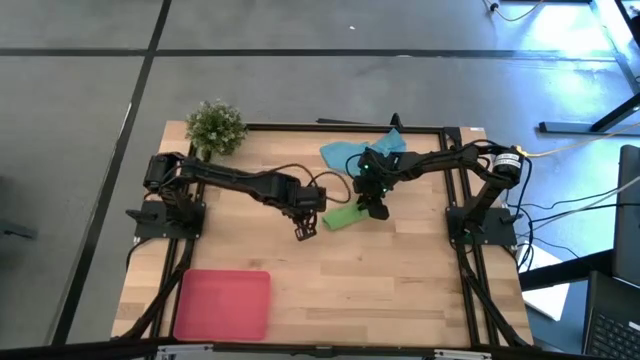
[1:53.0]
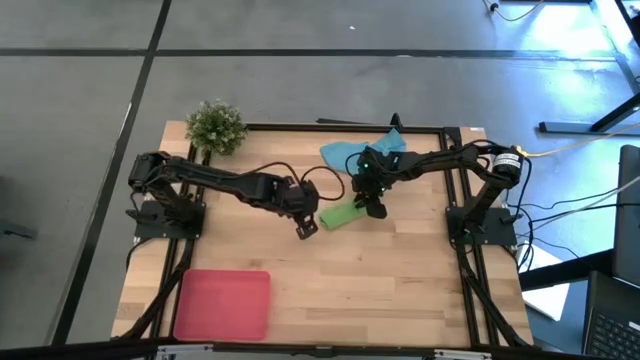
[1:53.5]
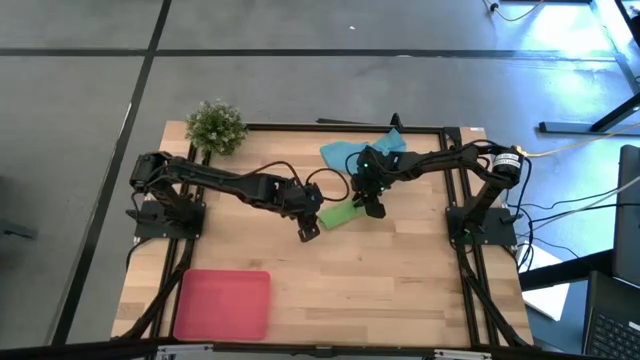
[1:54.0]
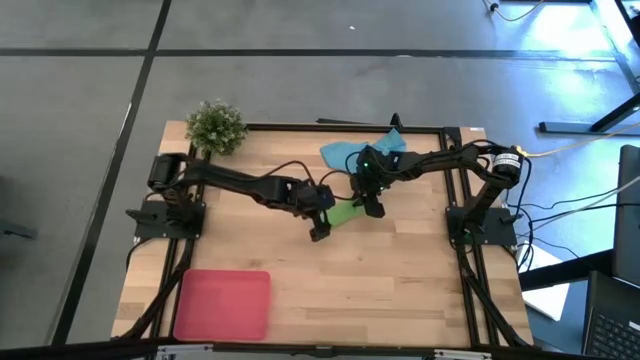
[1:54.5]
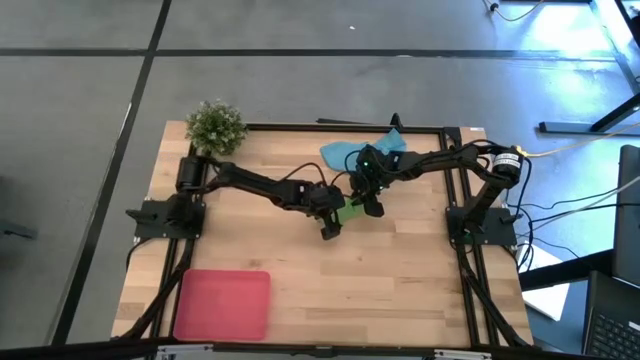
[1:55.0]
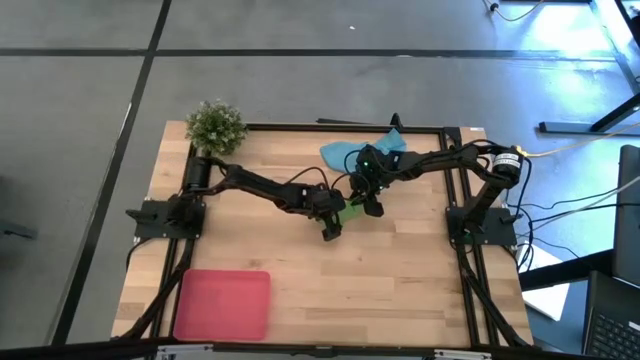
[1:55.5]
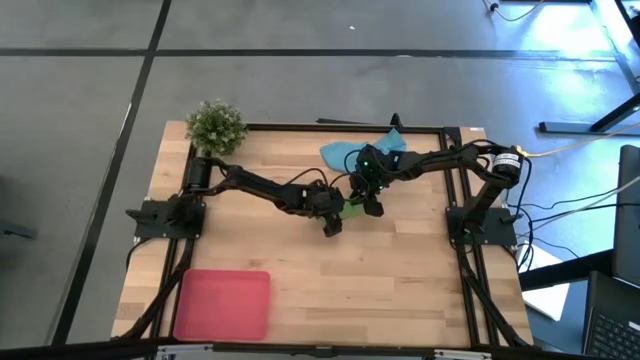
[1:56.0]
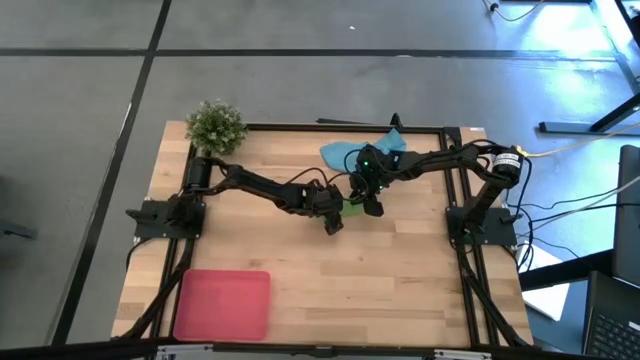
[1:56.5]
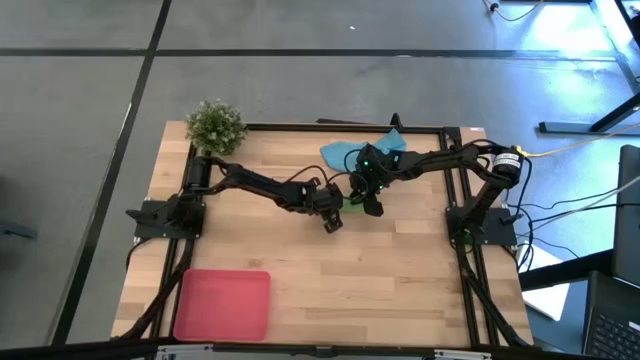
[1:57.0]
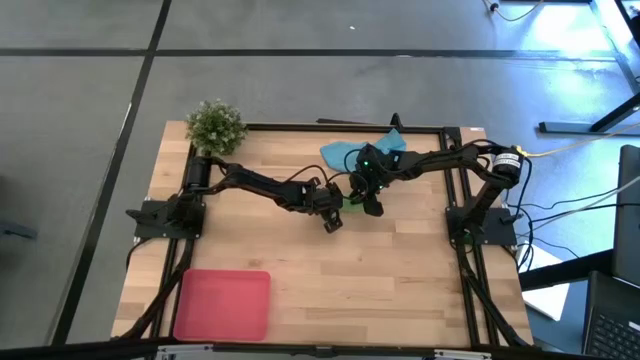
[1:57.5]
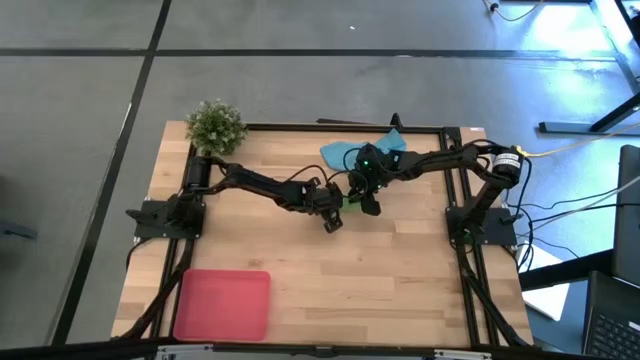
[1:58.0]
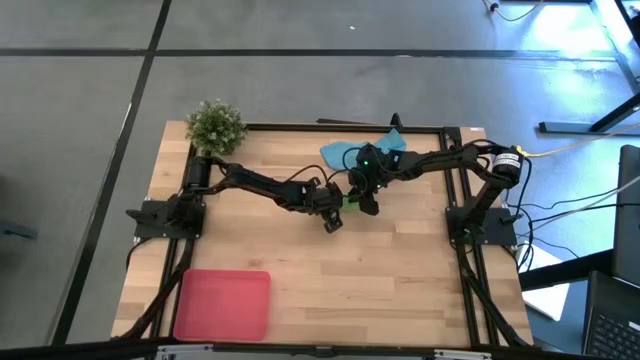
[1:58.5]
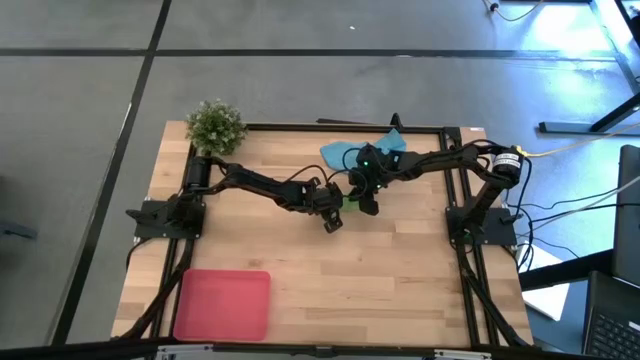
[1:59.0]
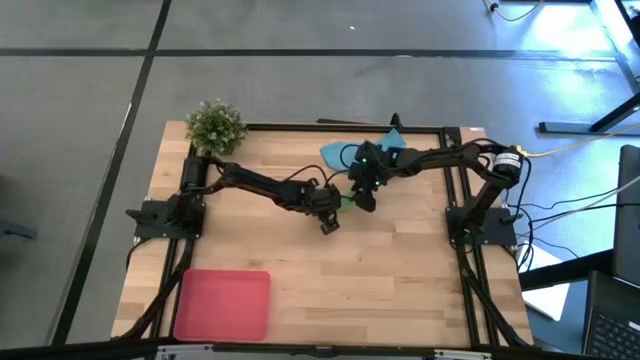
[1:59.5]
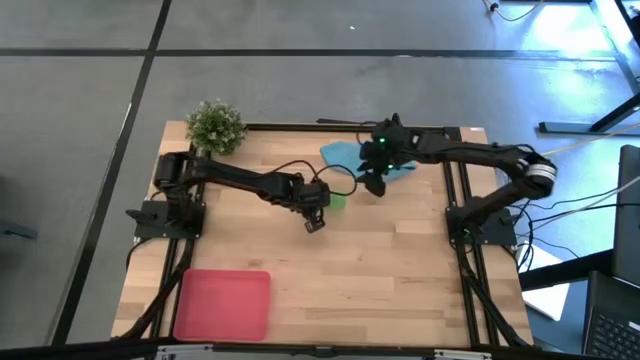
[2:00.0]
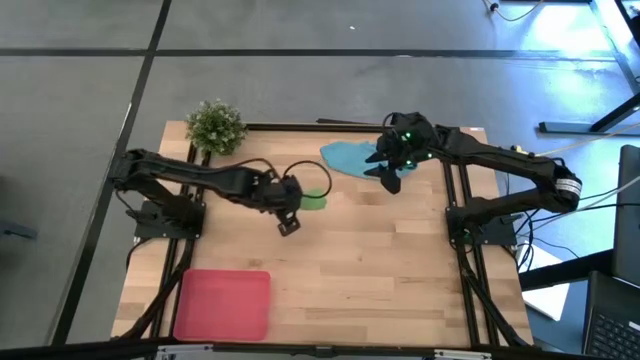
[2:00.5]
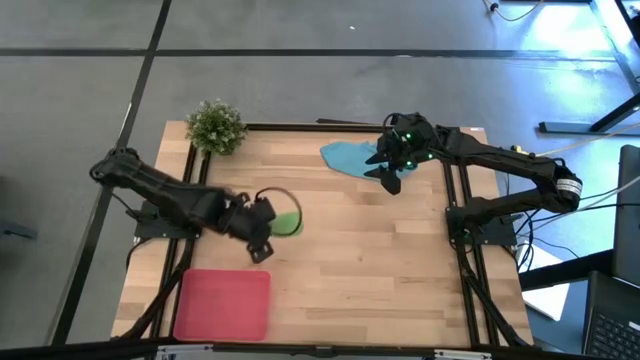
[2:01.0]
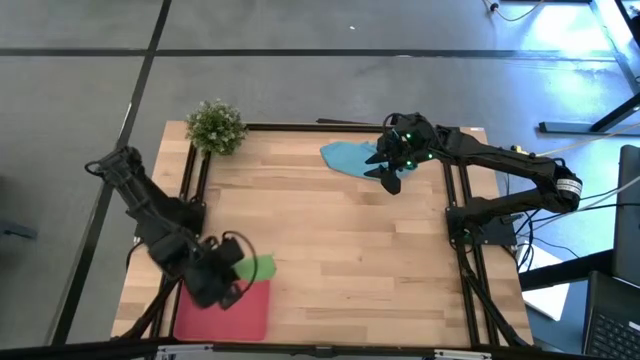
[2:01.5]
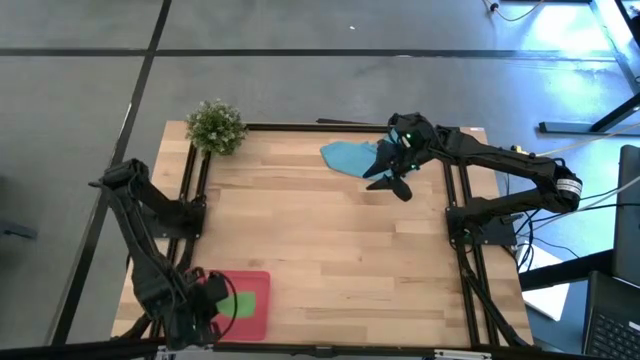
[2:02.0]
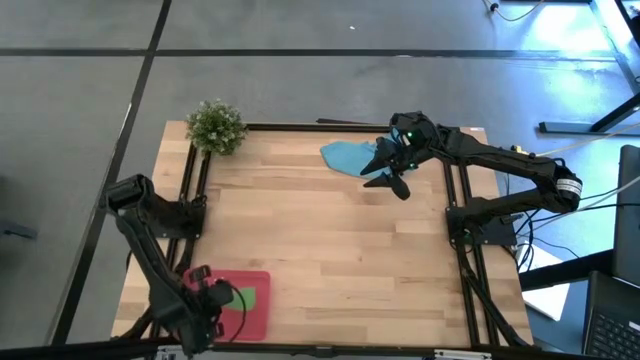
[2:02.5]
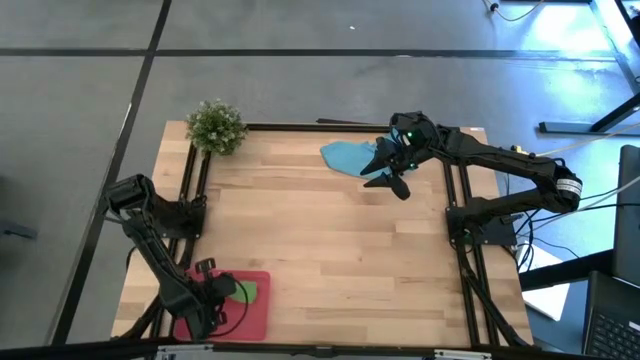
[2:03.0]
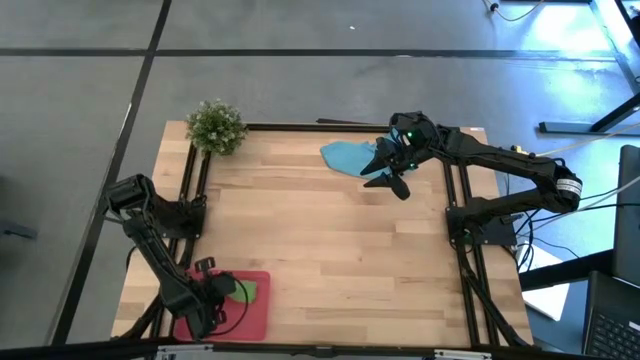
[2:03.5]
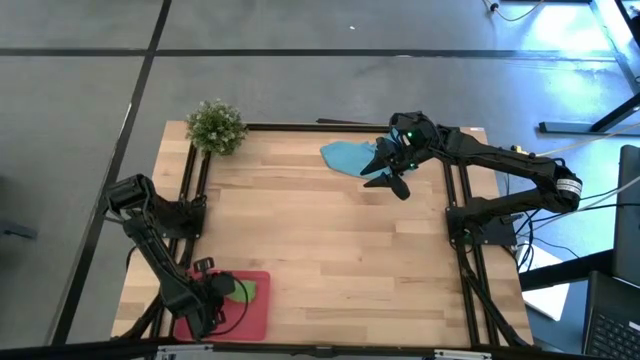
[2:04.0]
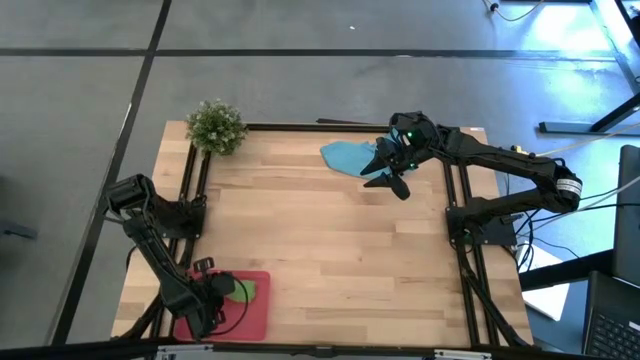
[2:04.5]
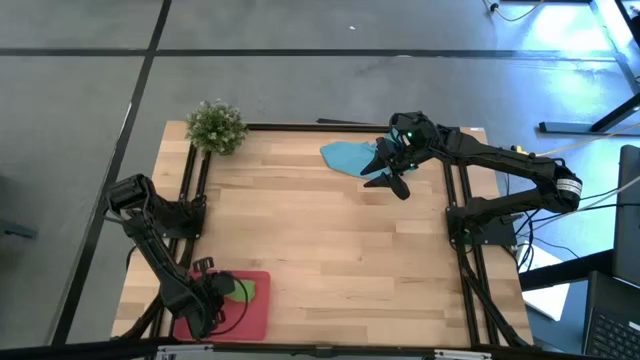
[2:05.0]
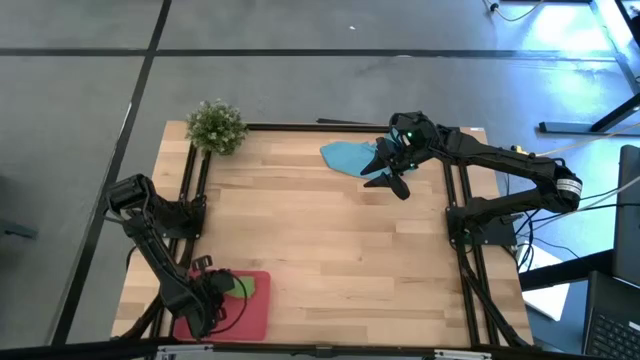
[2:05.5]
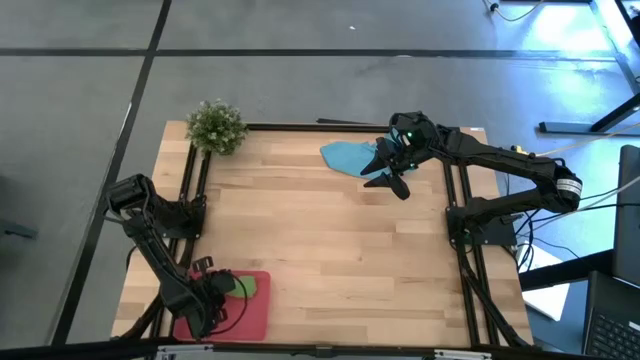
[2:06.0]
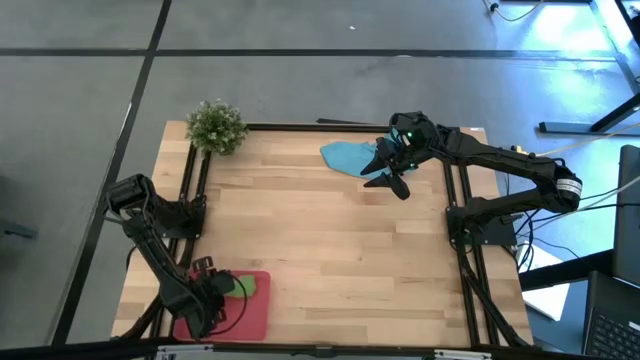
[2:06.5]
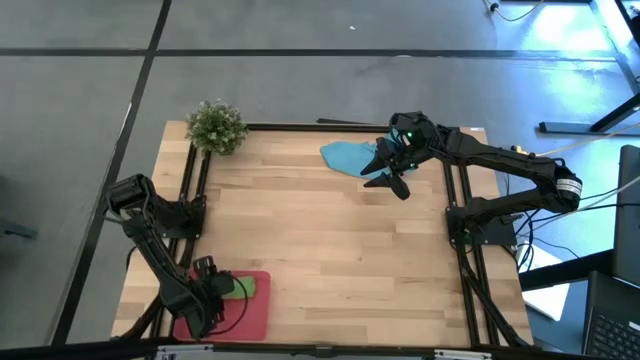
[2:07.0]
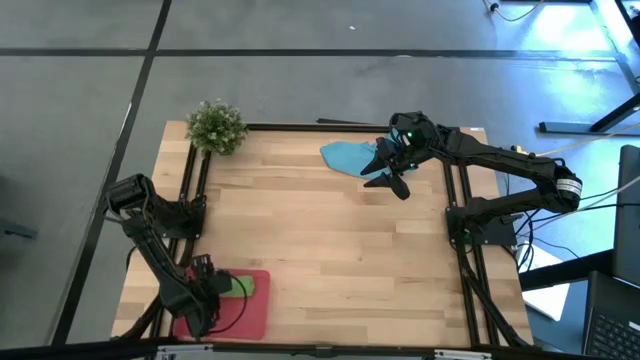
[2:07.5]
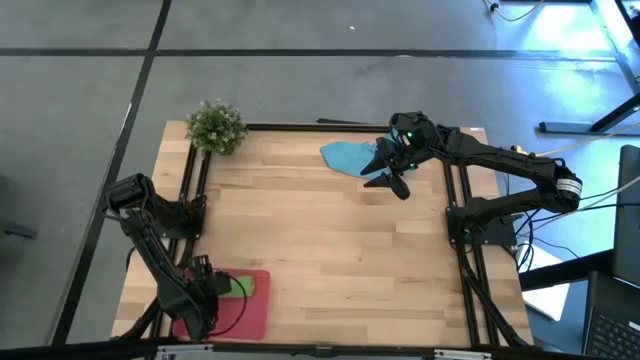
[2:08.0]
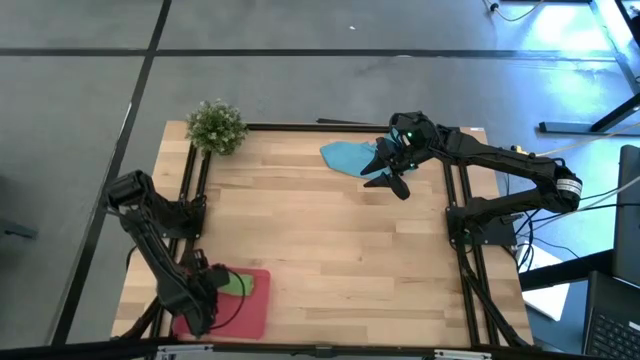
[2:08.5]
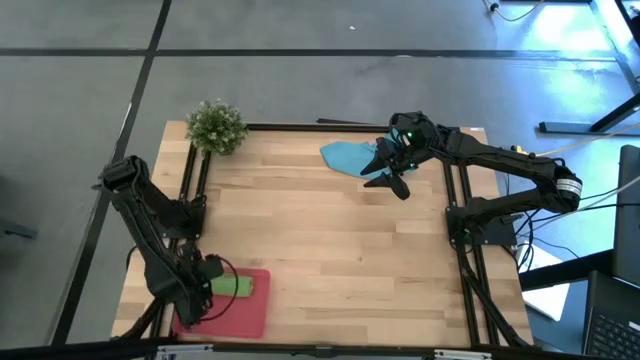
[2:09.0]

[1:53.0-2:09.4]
Task: Roll microfiber towels into tight, uniform cylinder then place into a basket
Put the folded microfiber green towel into the bin

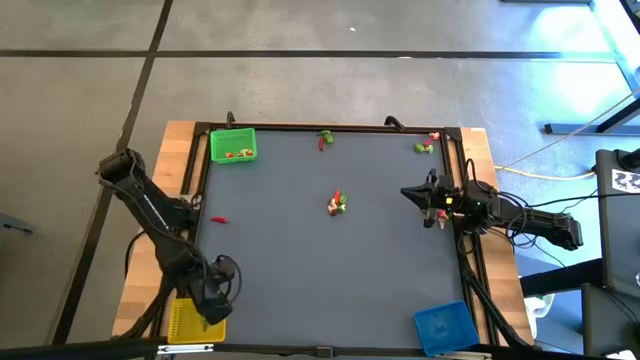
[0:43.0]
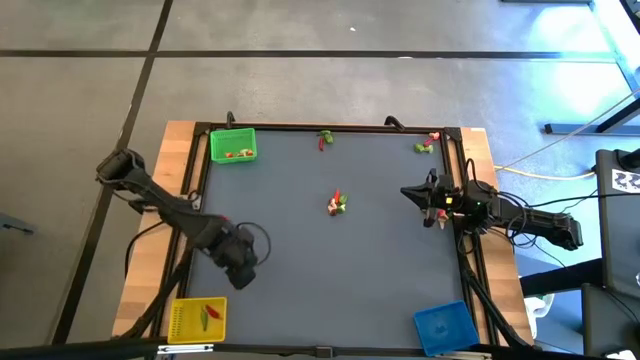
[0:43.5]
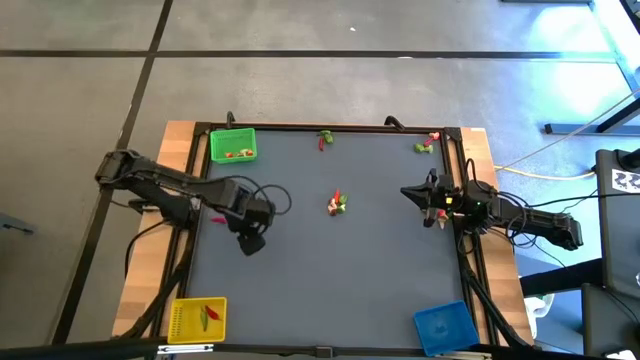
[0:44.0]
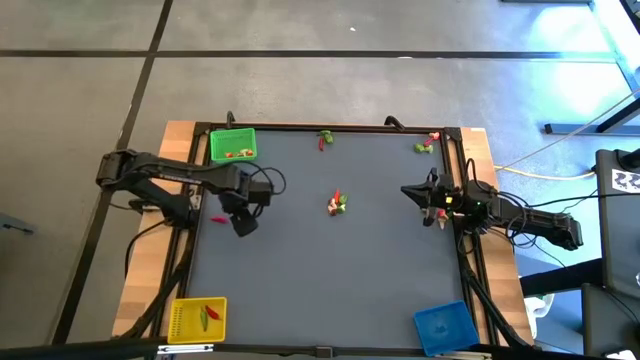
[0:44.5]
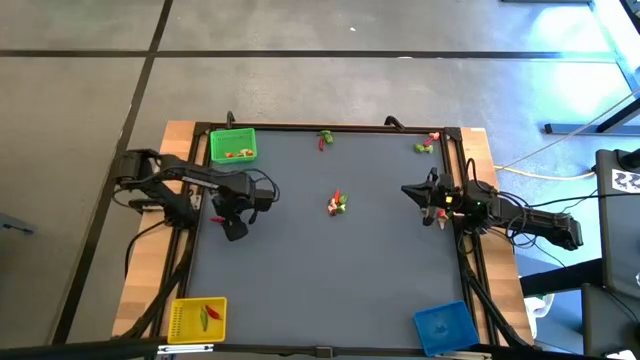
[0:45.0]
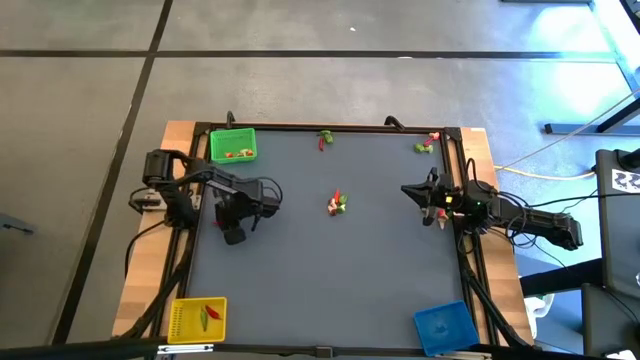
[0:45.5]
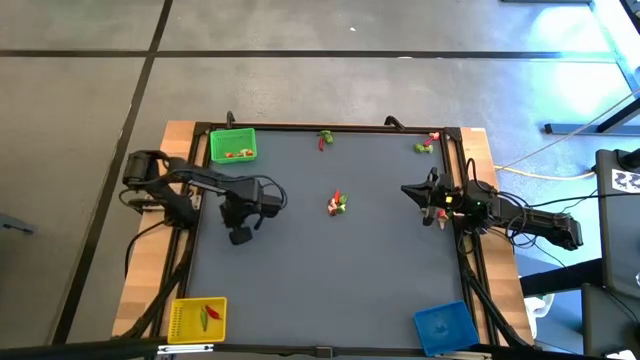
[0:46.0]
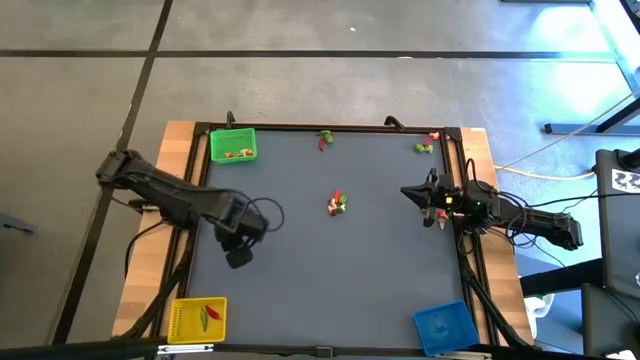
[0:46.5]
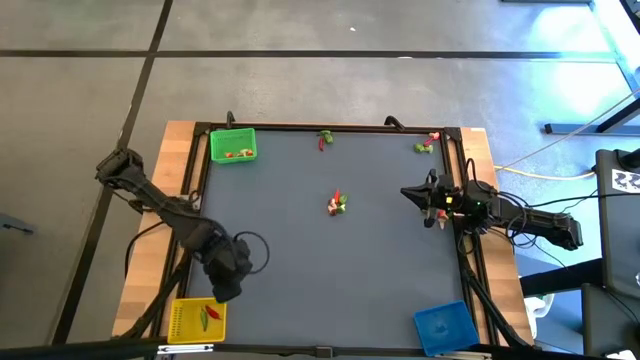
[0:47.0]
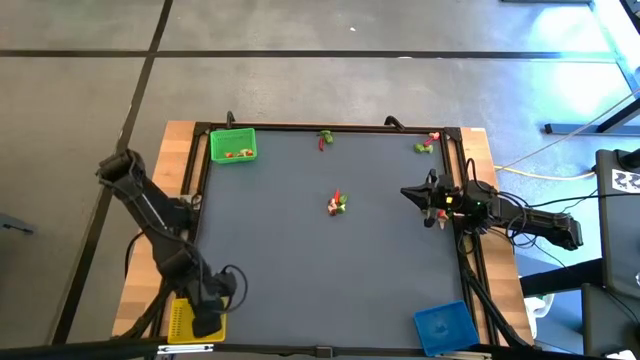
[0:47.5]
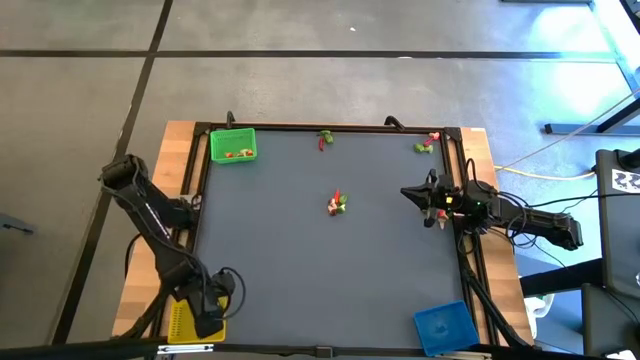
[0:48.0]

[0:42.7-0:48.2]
Task: Sort produce into baskets
Put the red chili pepper into the yellow bin
